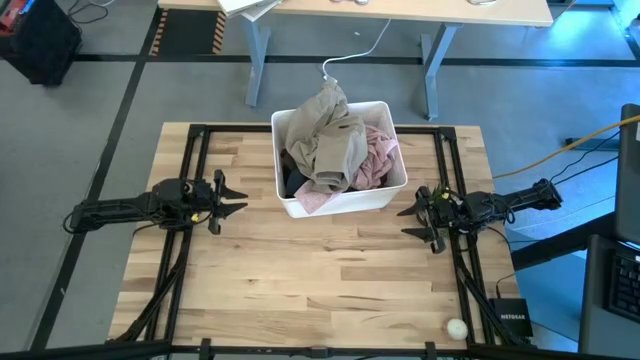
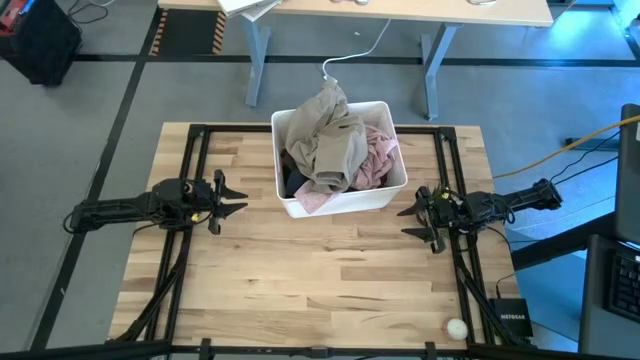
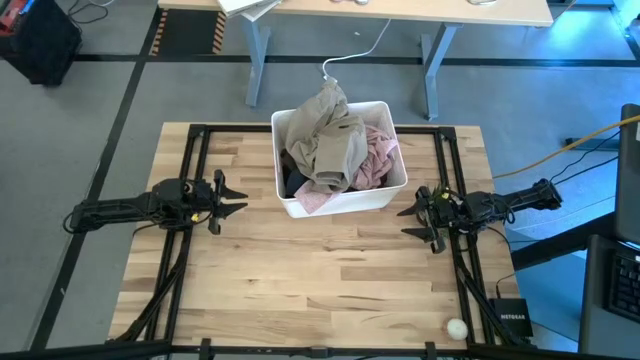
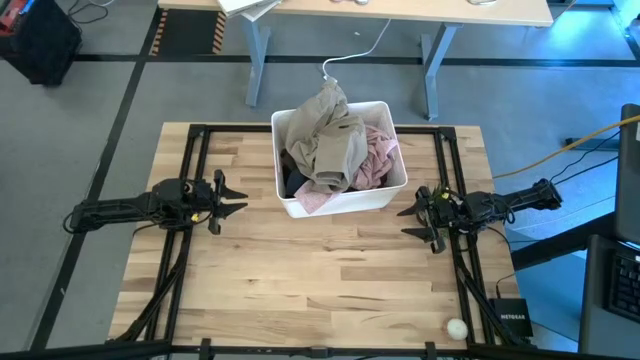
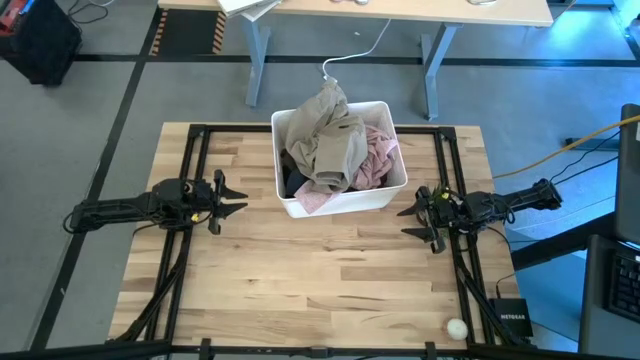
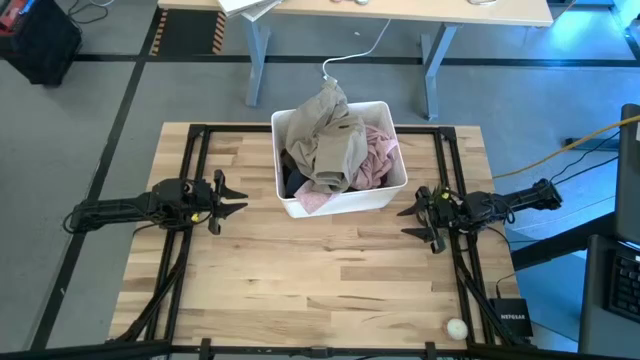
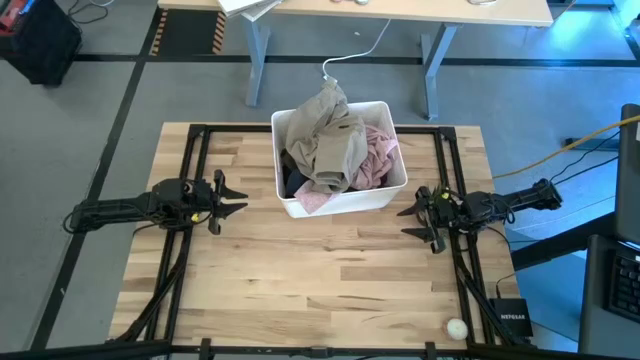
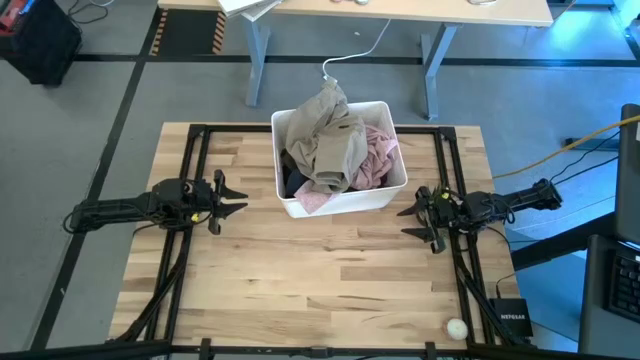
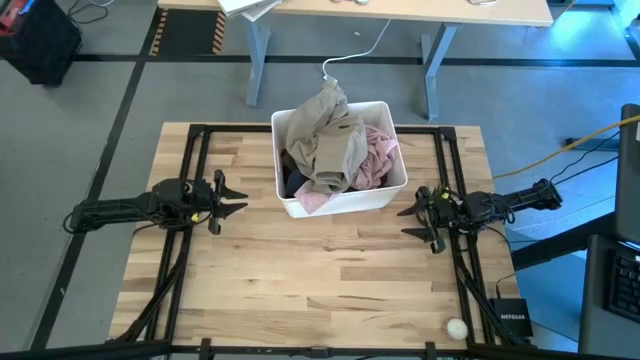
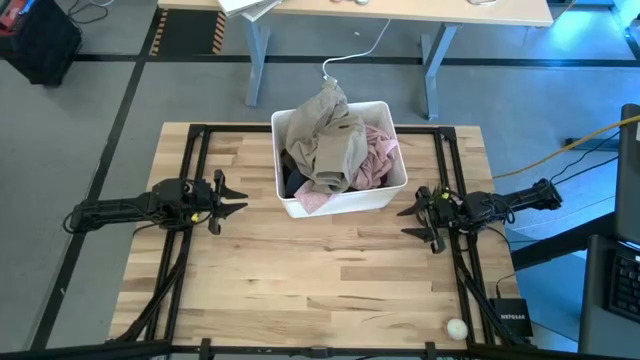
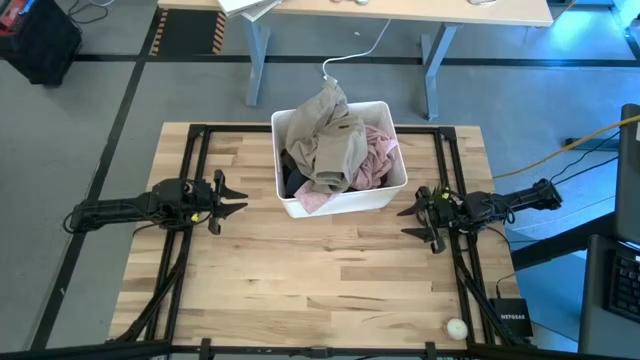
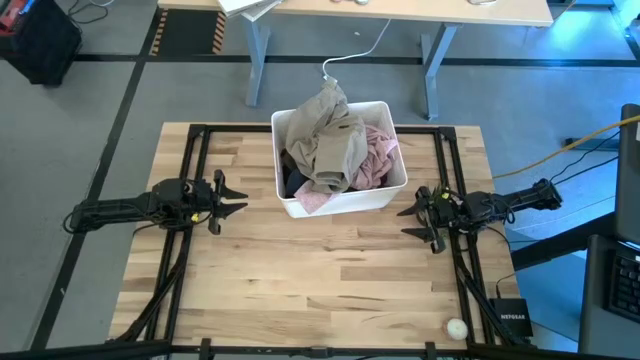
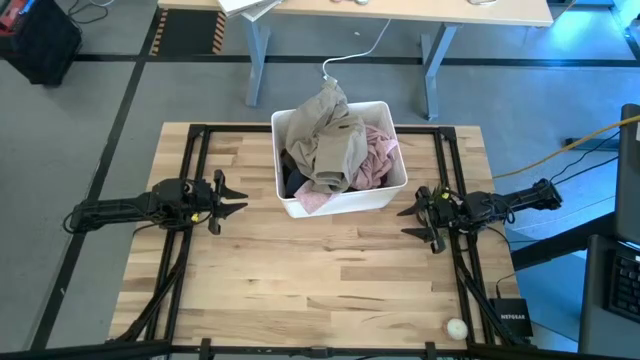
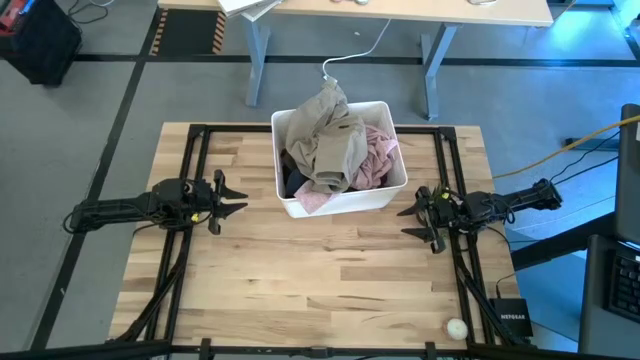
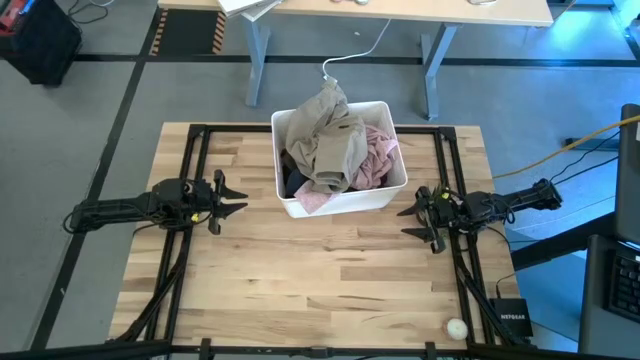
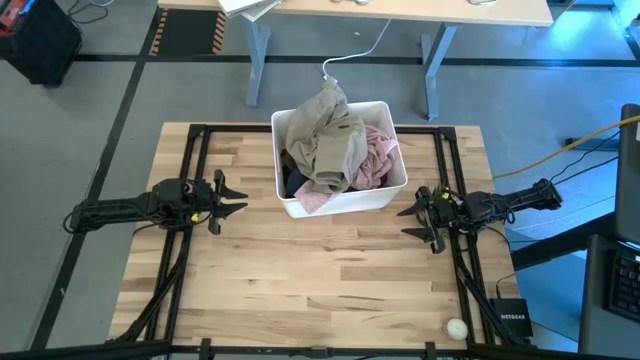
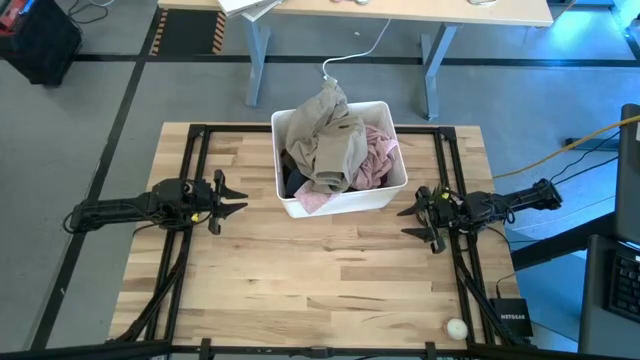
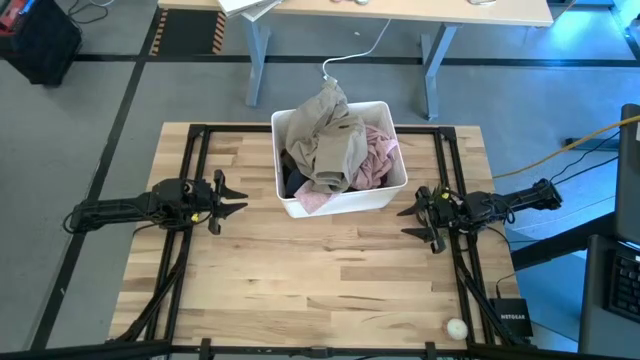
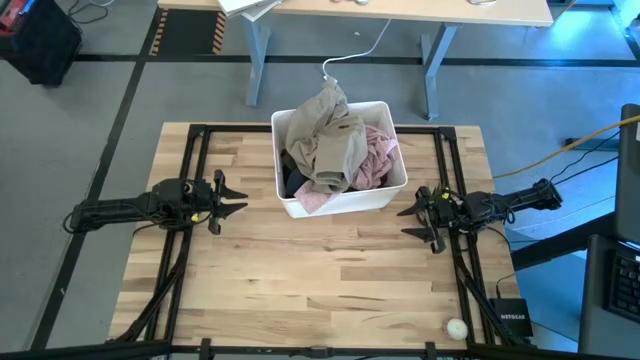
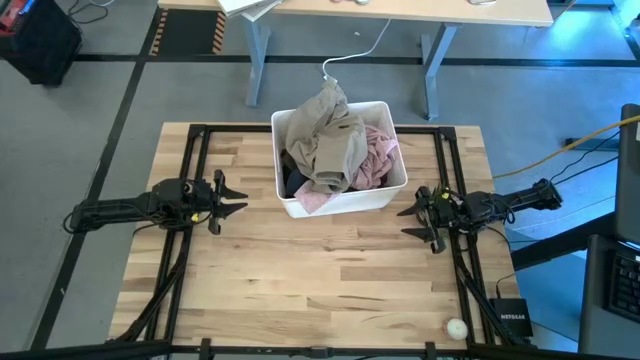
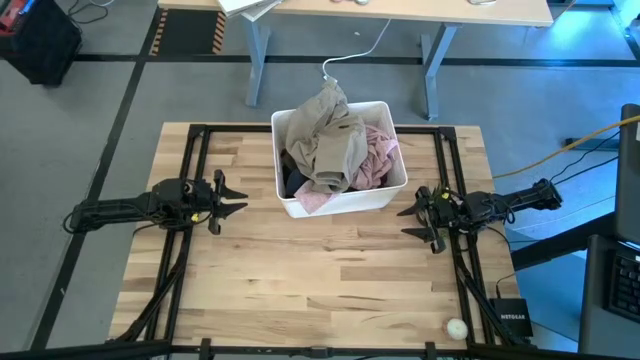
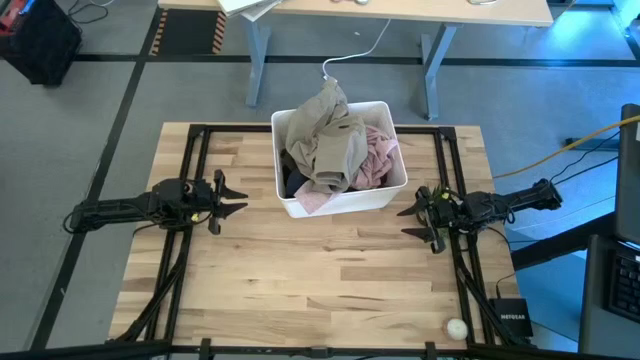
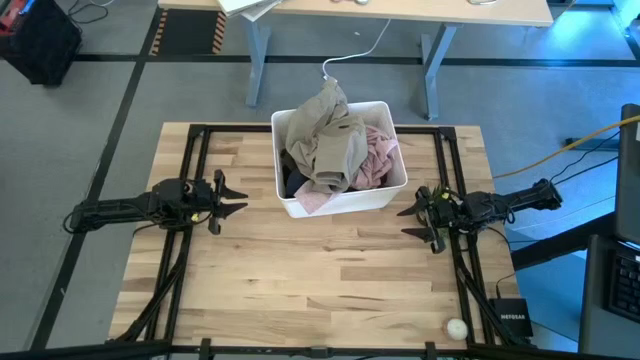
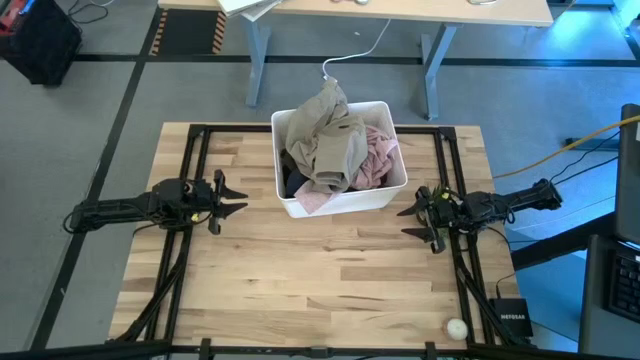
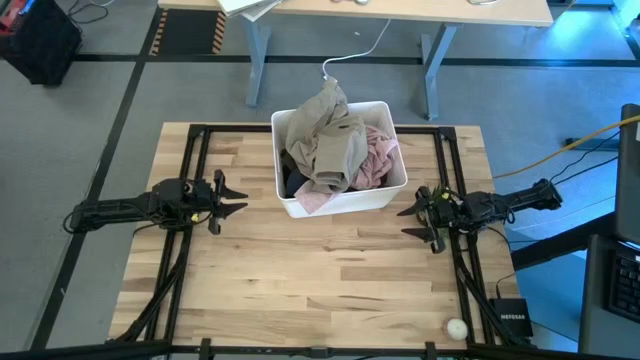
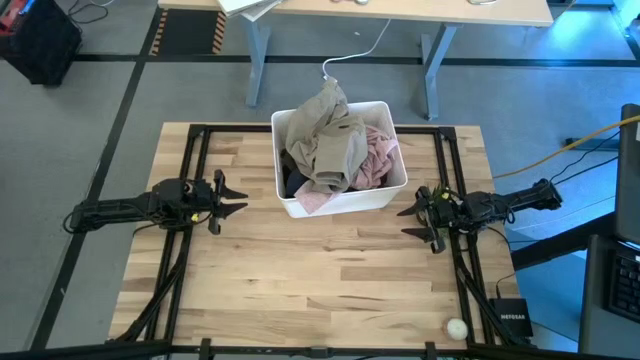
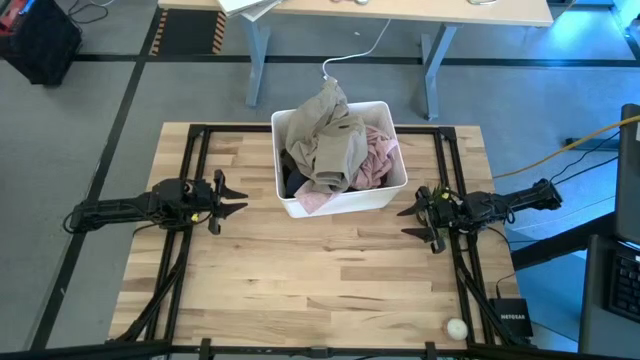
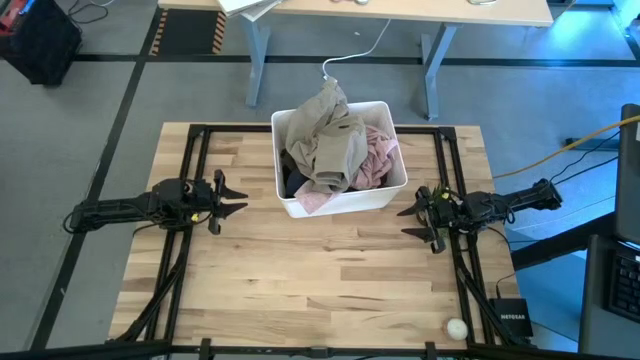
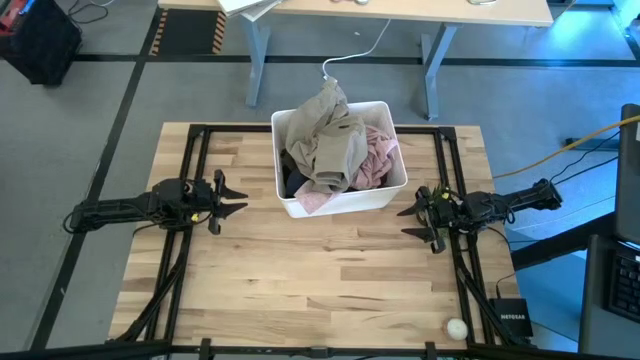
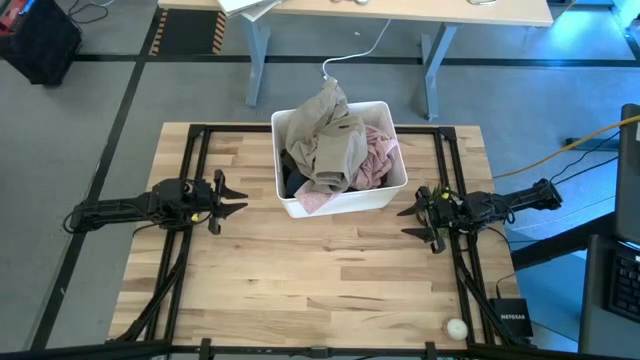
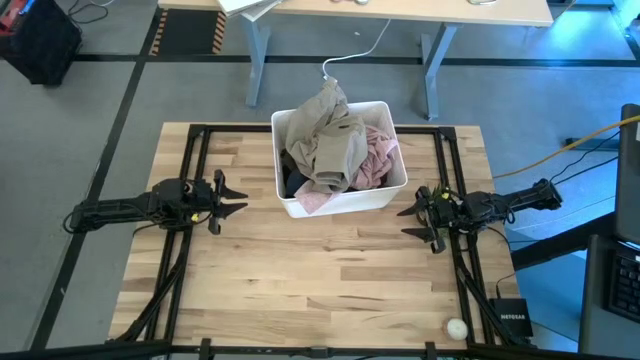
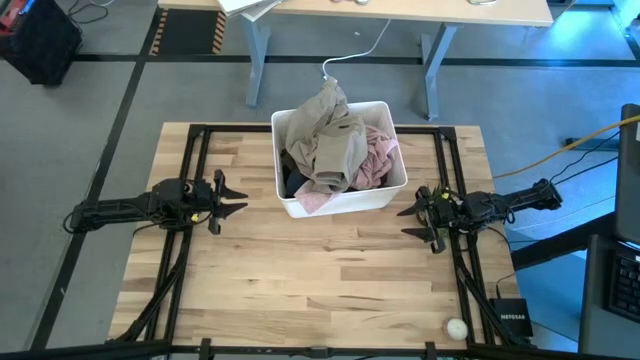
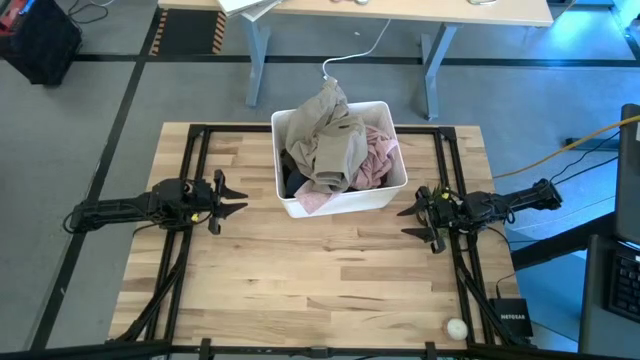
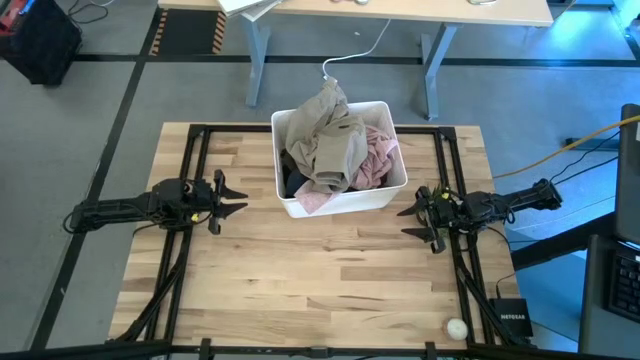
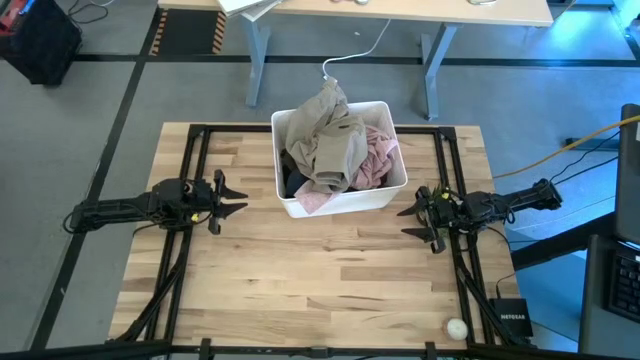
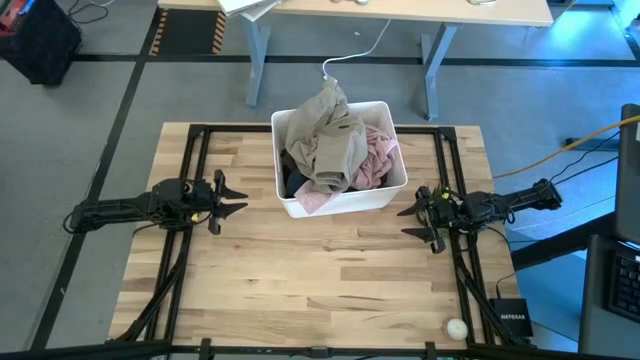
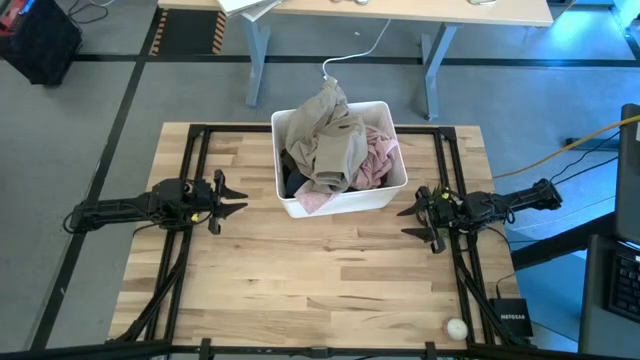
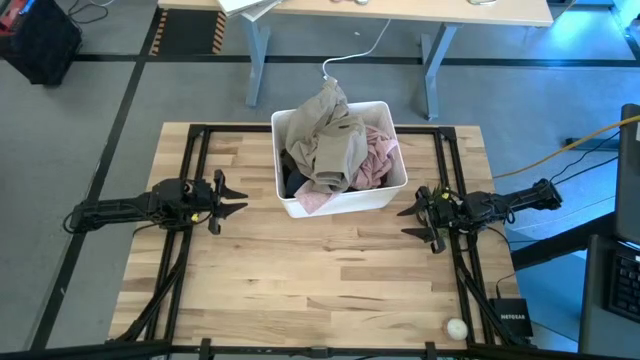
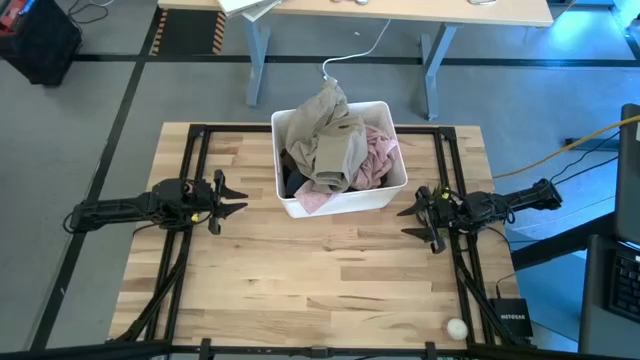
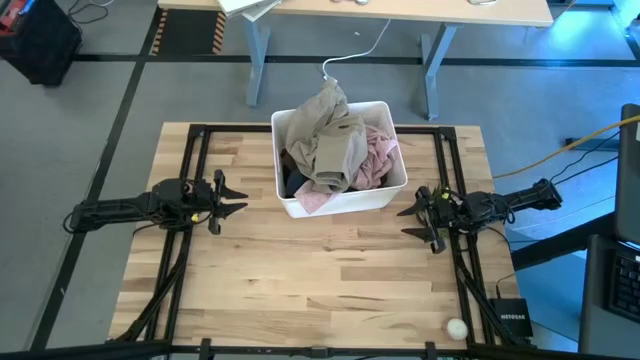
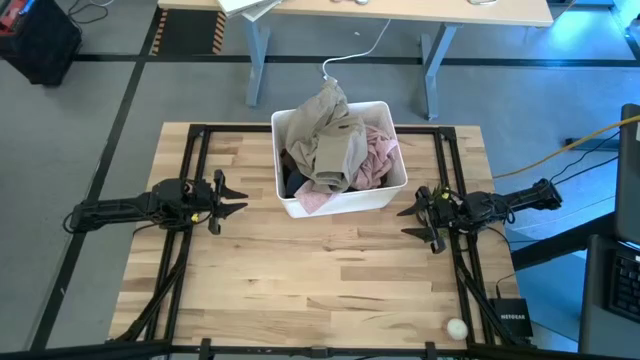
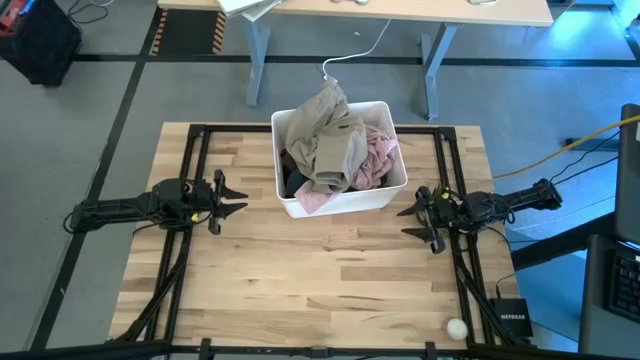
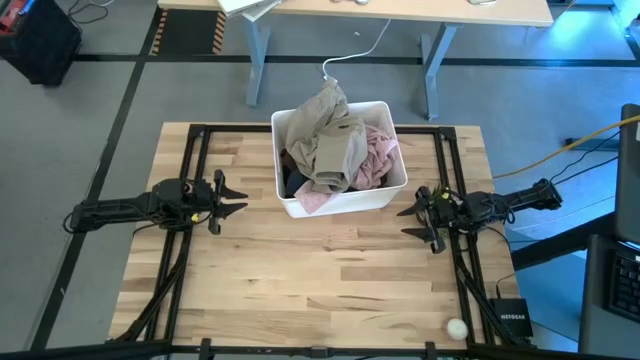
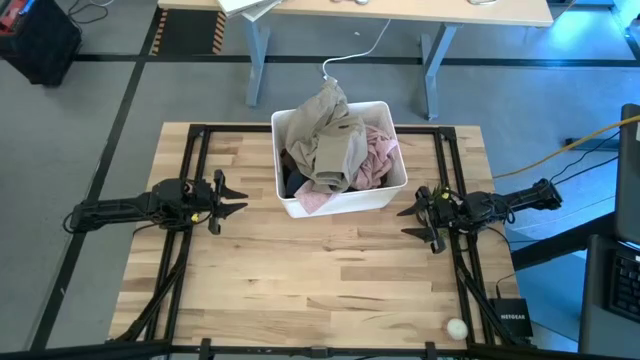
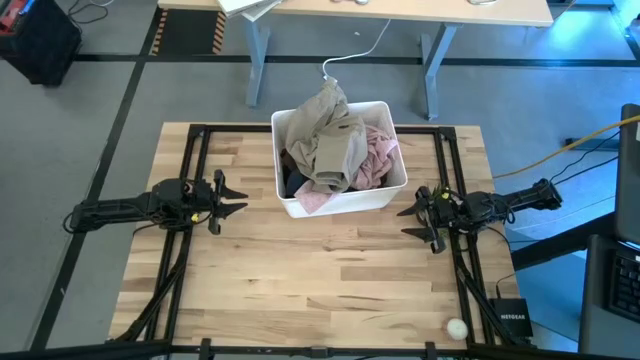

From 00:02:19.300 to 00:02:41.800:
Task: Sort clothes
Return to Home Position
